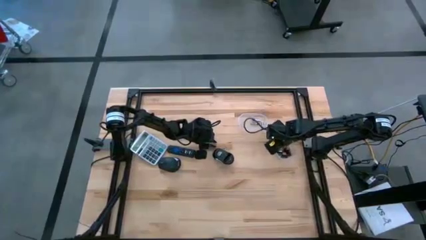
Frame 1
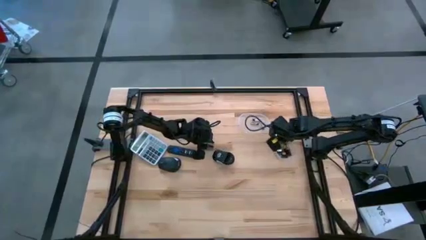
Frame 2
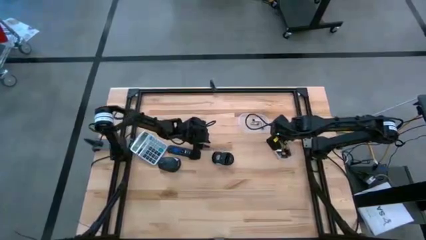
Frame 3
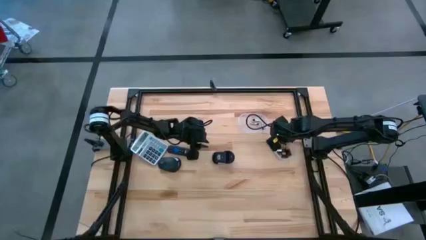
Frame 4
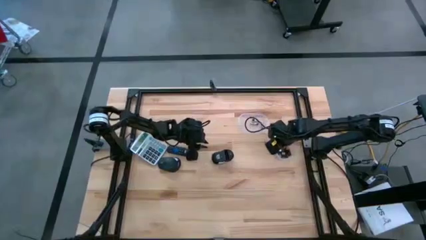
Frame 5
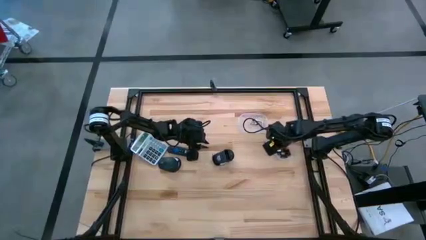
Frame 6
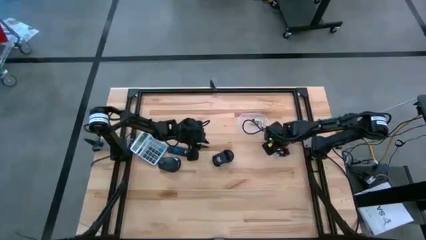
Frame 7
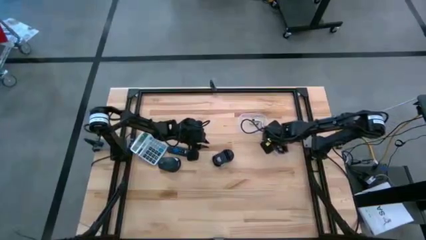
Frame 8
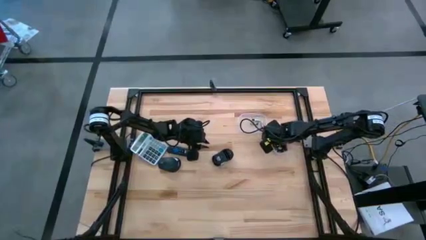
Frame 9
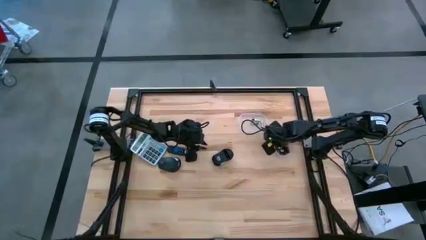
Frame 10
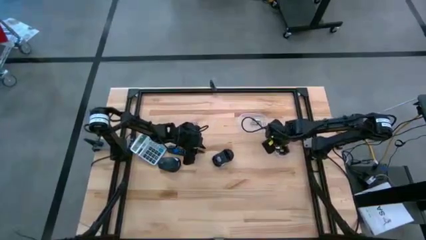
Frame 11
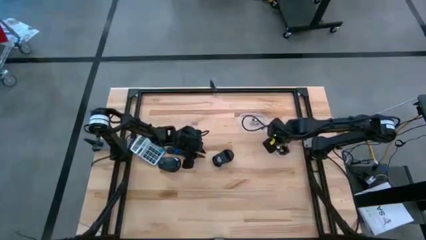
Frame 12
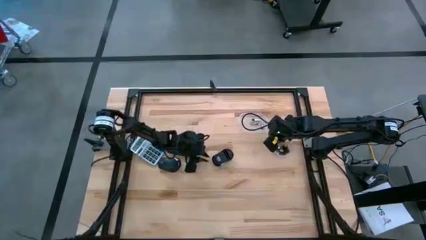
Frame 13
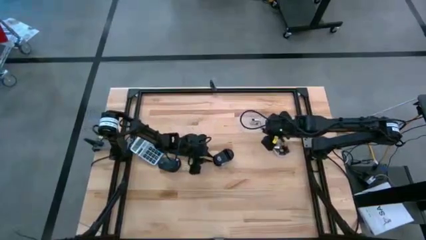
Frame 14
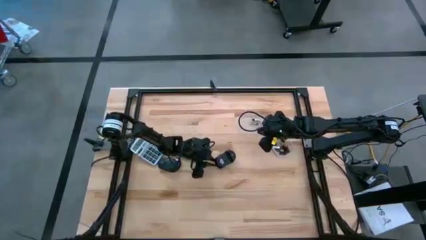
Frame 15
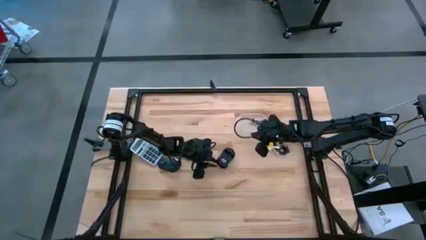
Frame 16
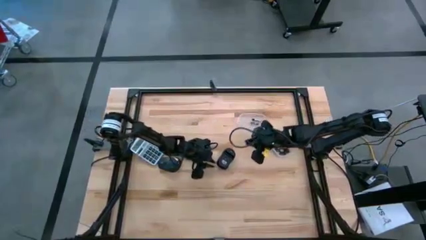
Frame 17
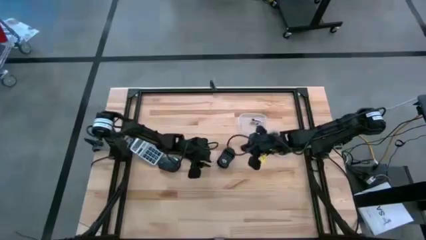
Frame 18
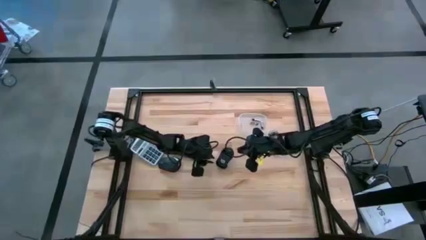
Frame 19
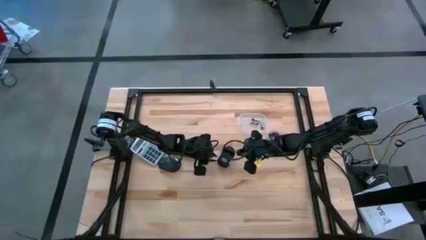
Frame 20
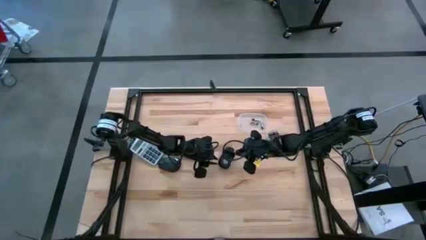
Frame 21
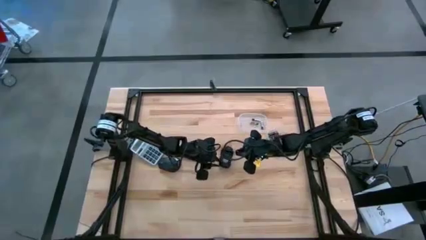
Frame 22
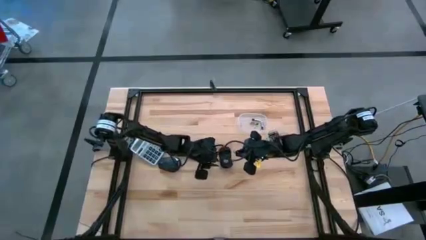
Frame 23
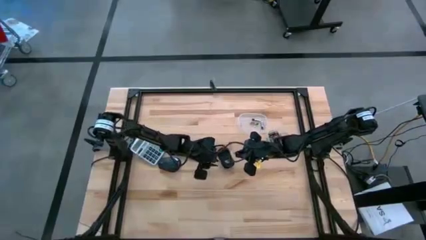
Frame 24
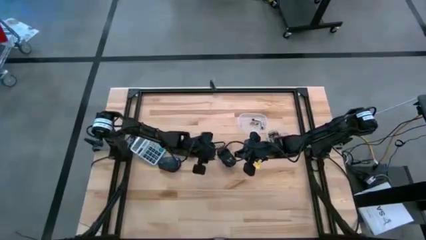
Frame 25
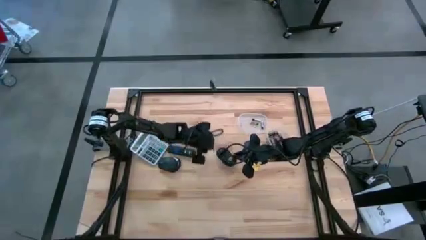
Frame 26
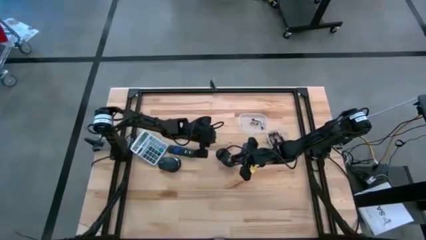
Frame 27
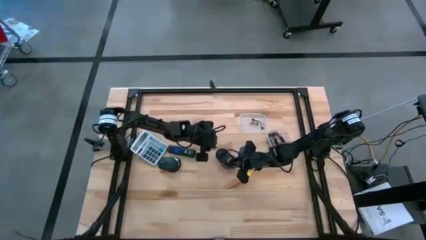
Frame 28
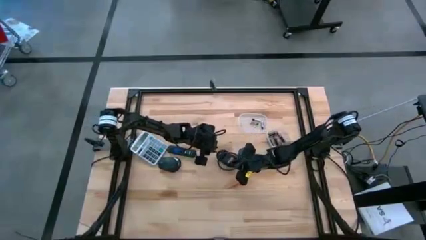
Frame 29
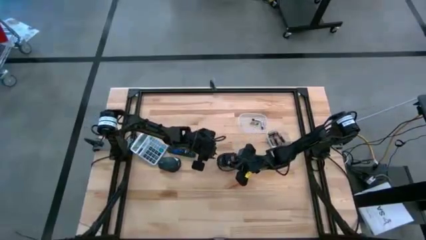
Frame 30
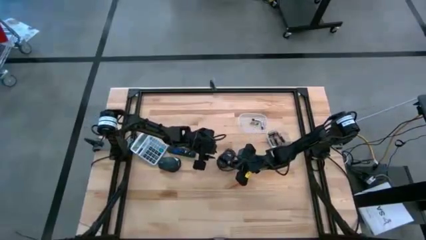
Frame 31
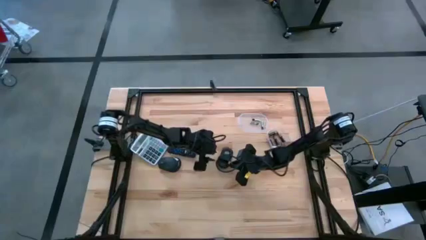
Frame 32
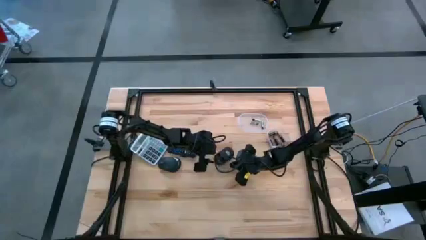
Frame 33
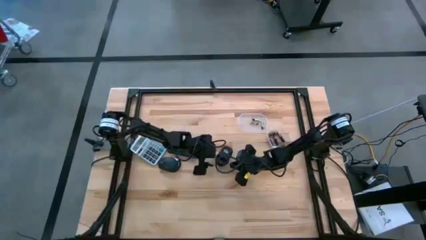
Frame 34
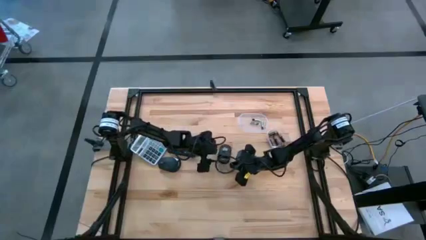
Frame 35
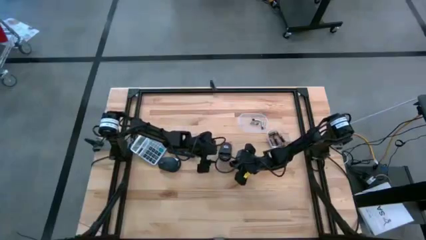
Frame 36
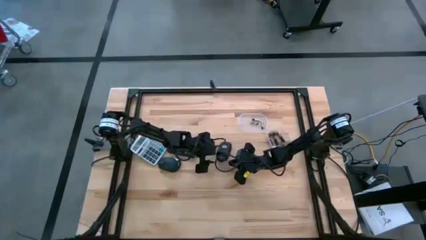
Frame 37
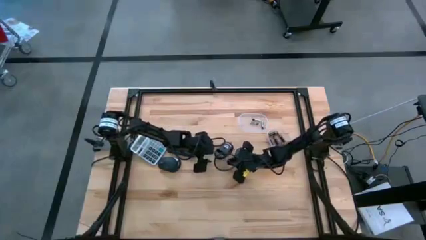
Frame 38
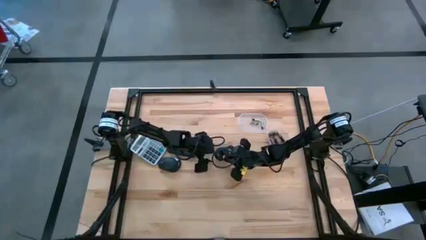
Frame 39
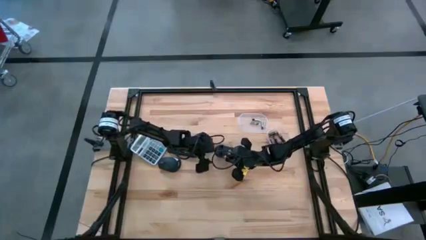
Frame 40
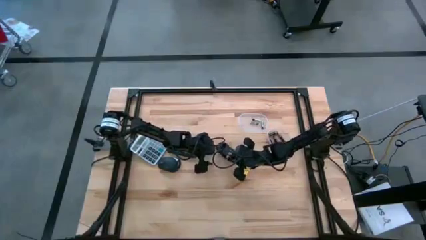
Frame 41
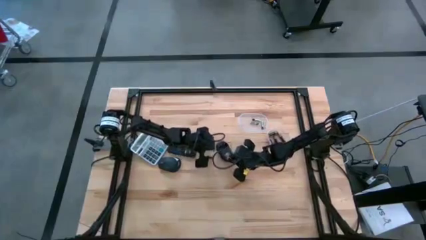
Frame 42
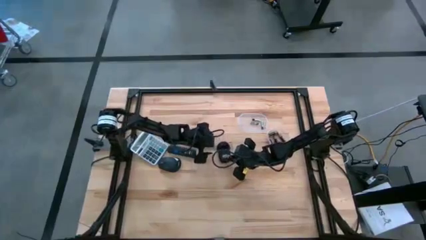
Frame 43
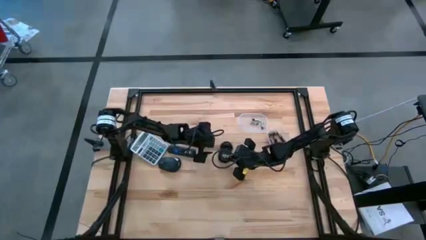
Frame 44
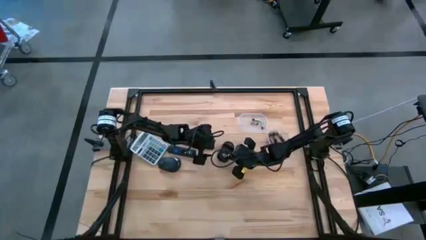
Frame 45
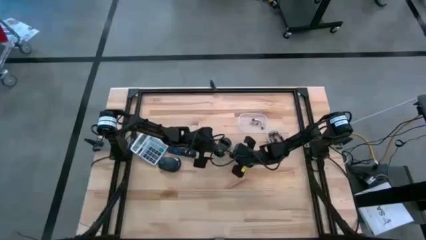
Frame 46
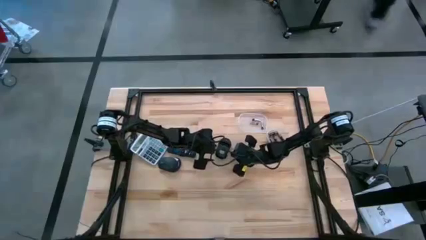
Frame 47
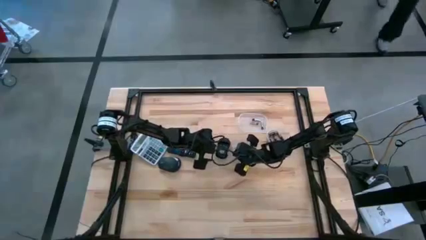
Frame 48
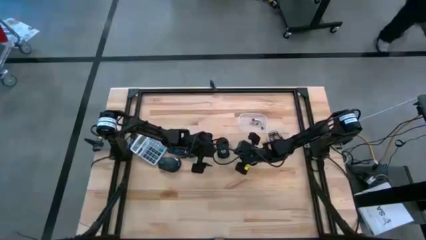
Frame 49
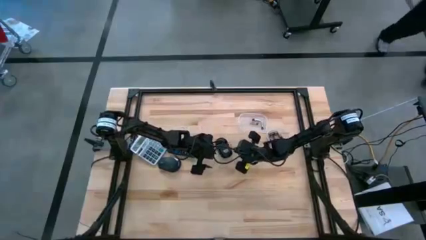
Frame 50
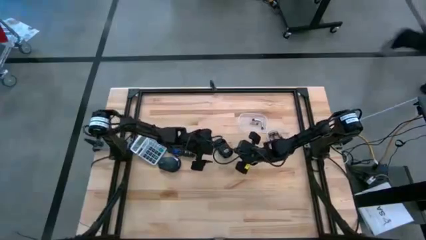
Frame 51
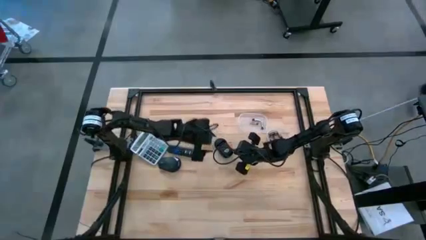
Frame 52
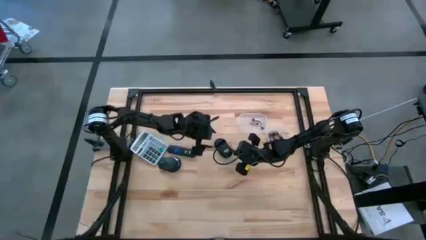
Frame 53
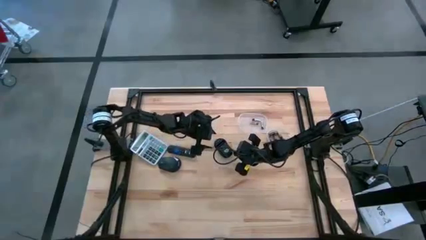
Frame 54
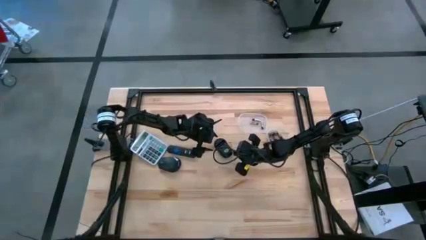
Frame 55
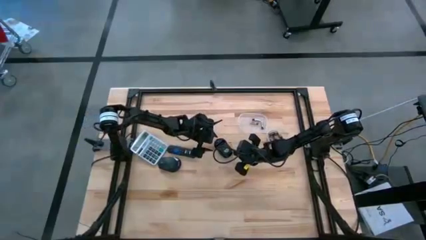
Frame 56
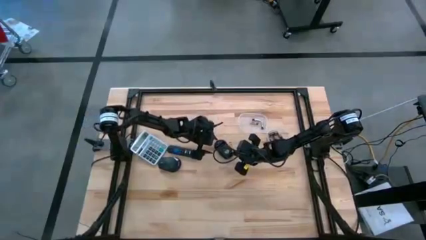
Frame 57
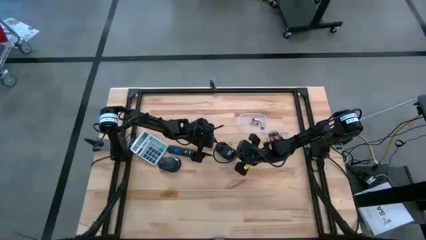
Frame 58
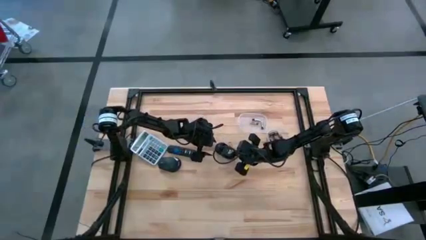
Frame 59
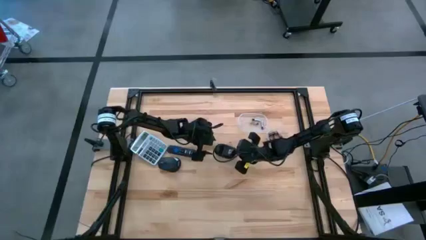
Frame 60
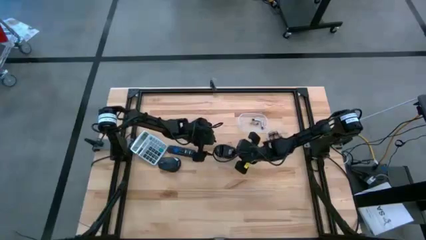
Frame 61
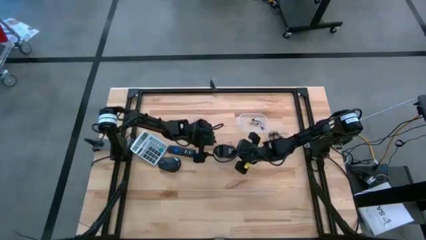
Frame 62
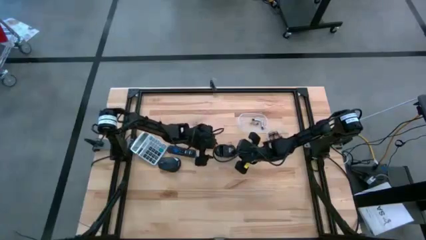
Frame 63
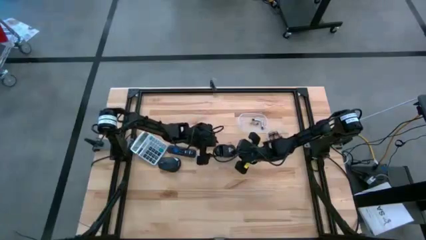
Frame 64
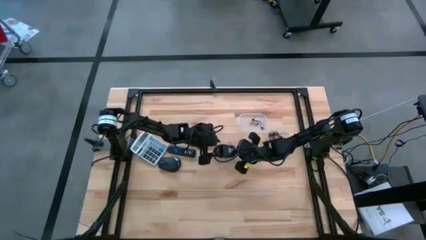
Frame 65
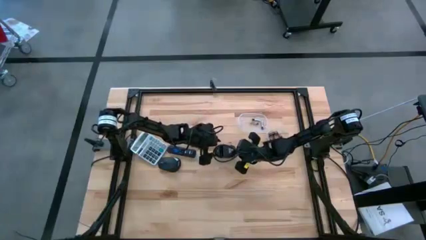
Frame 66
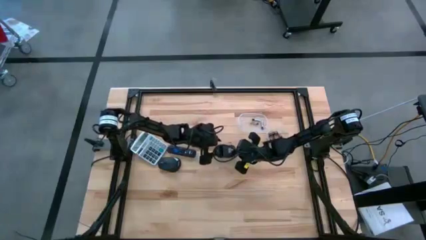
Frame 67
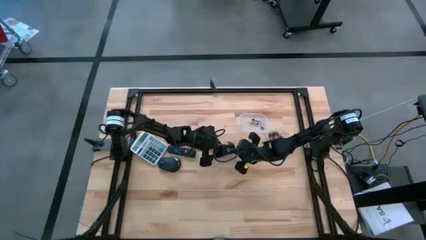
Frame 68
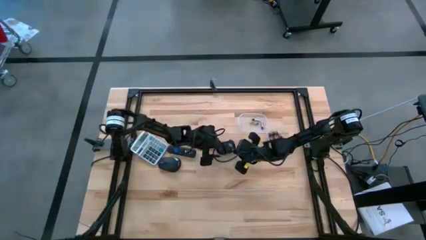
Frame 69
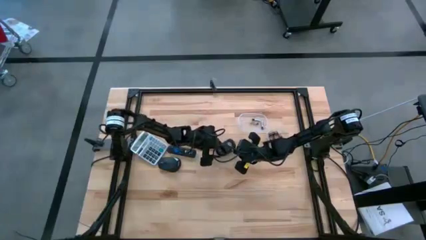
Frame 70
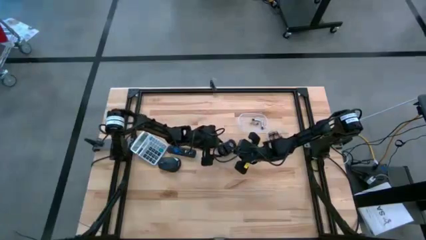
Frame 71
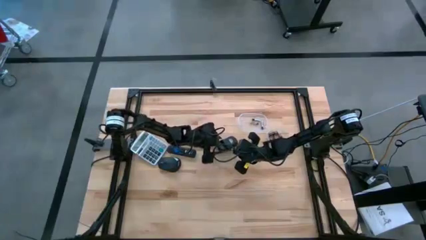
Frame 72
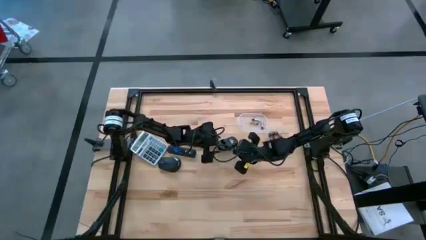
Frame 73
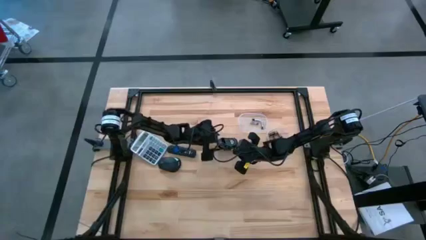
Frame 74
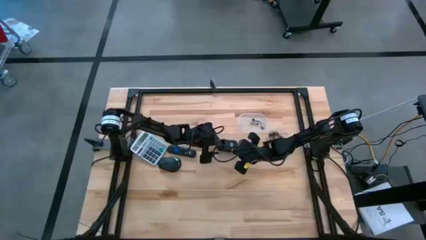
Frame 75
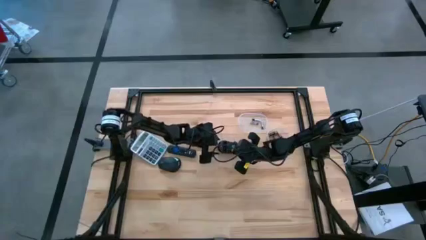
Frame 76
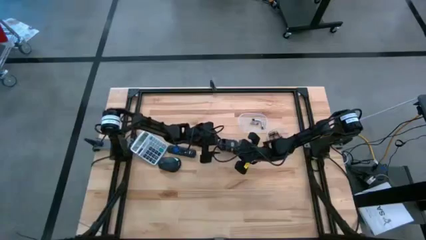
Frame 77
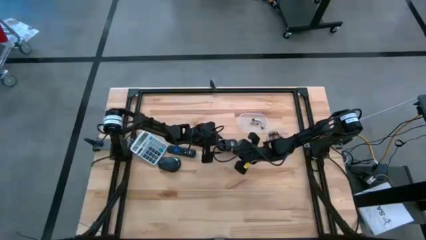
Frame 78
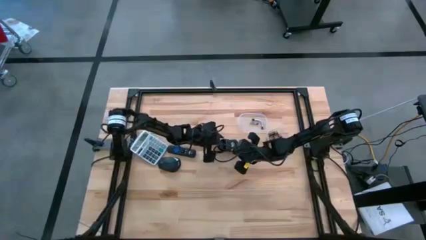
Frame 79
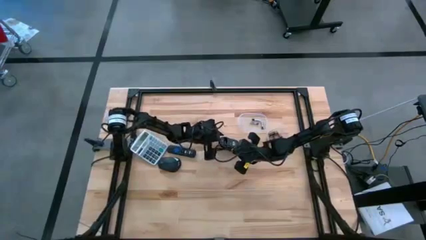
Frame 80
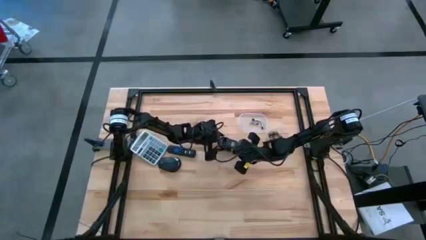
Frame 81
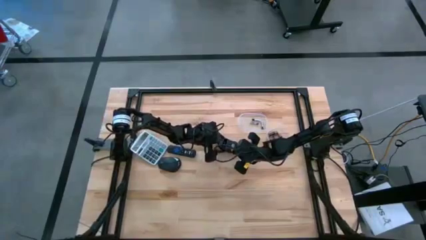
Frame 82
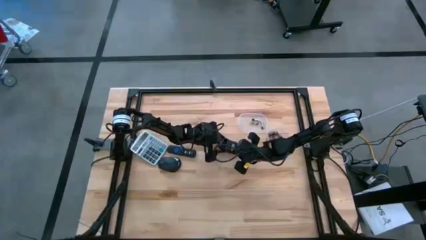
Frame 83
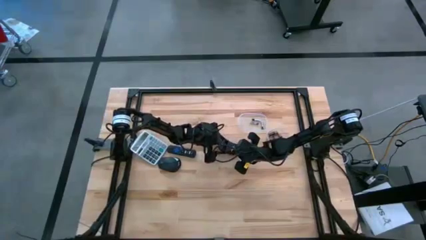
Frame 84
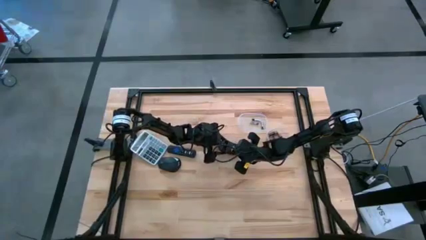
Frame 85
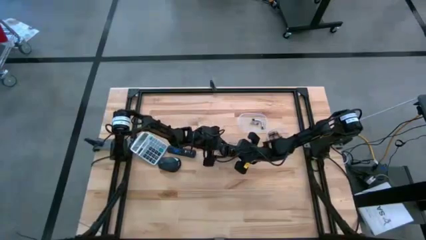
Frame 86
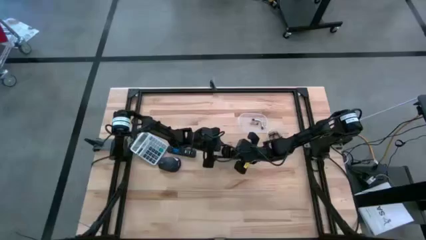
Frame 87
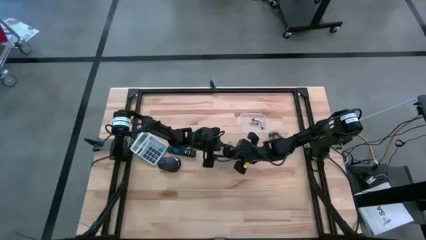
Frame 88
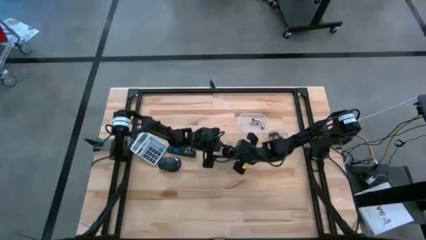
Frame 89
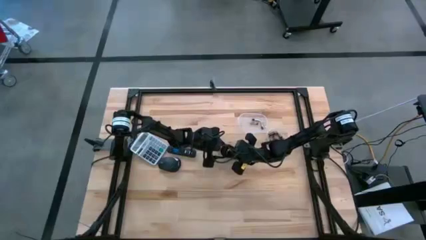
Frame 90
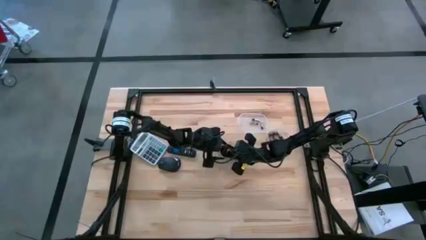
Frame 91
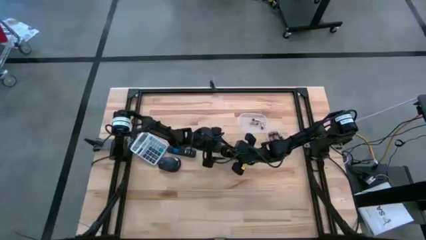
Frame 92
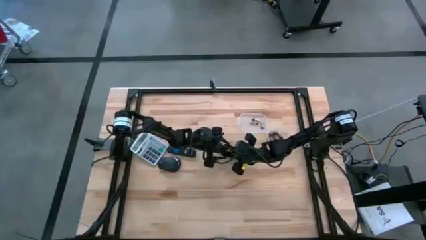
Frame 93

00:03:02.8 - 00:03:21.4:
Task: Insert battery
Insert the brown battery into the black mouse battery compartment
